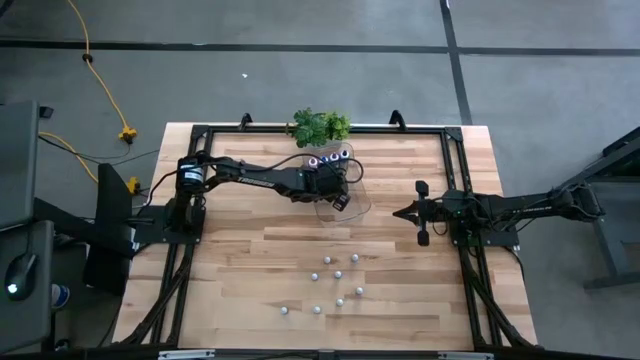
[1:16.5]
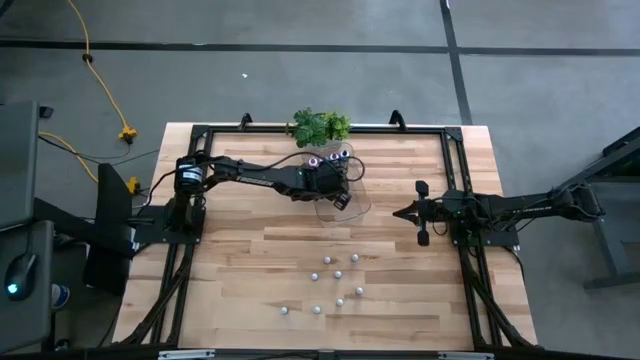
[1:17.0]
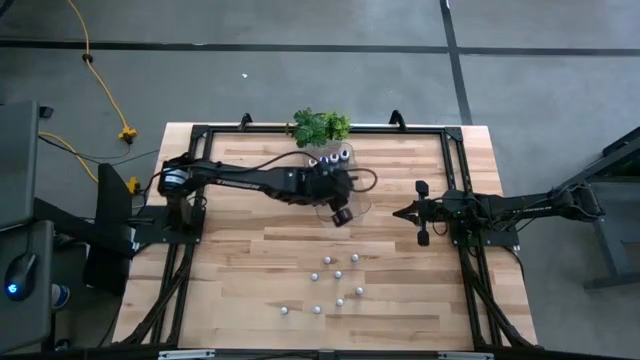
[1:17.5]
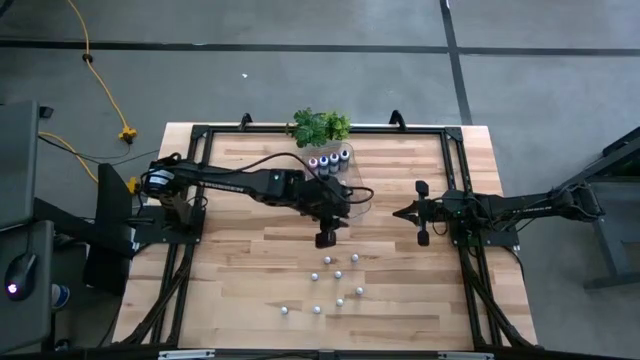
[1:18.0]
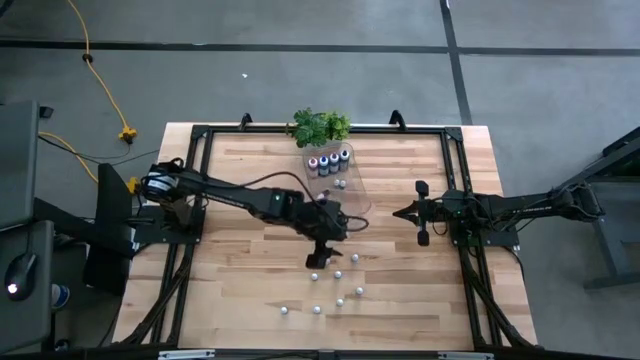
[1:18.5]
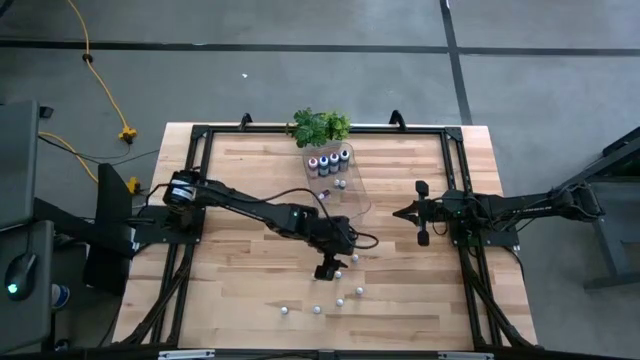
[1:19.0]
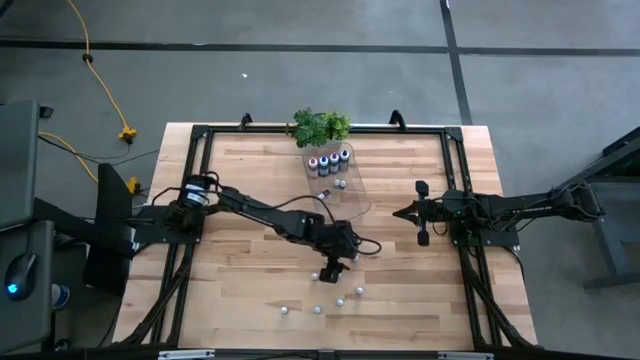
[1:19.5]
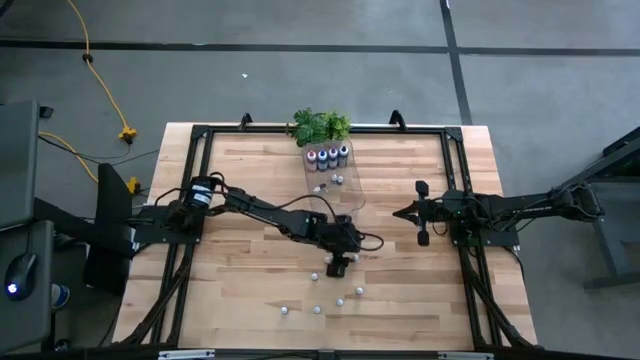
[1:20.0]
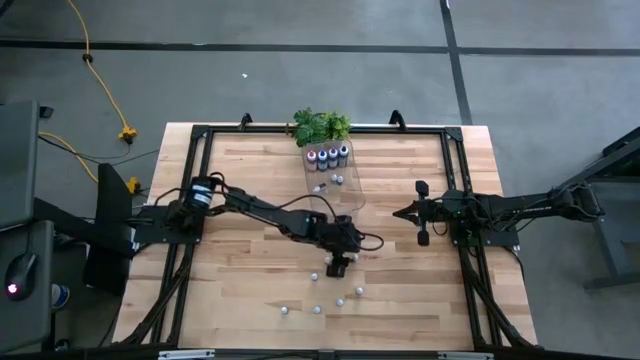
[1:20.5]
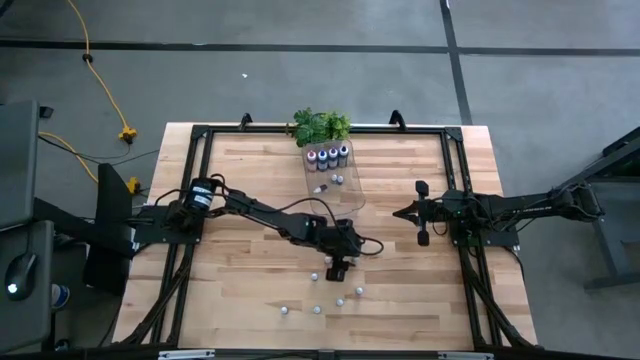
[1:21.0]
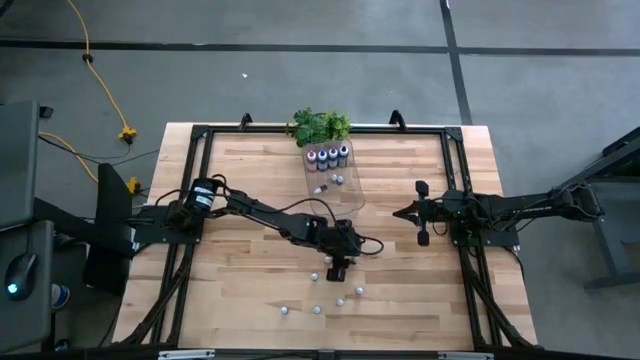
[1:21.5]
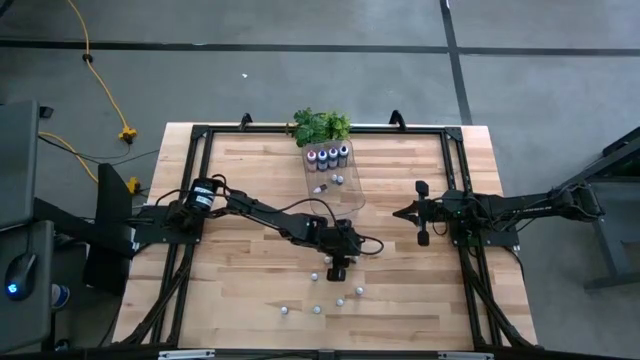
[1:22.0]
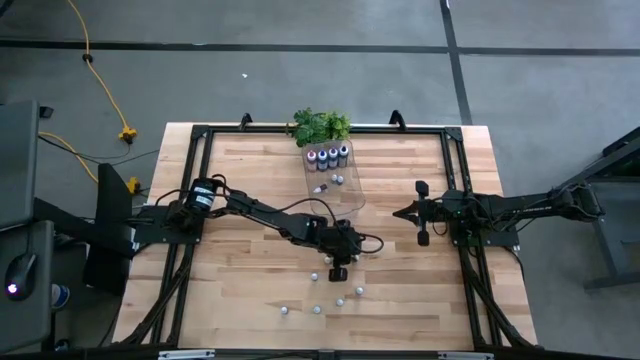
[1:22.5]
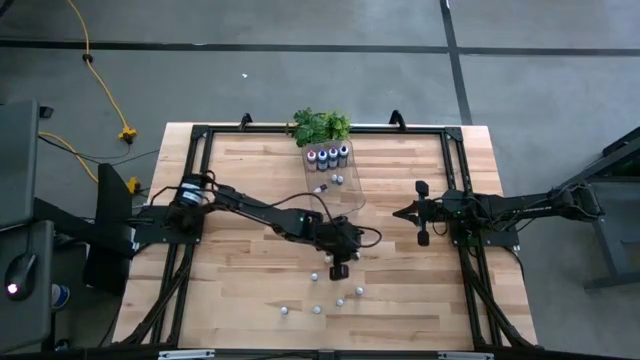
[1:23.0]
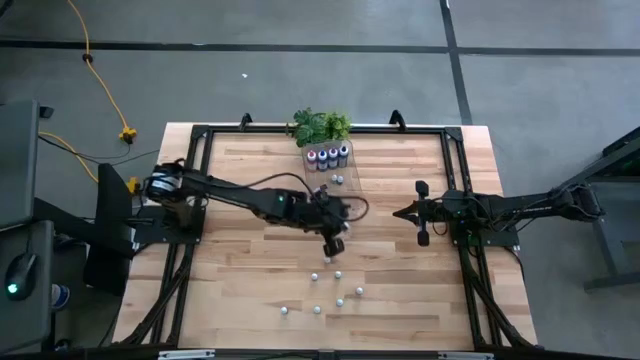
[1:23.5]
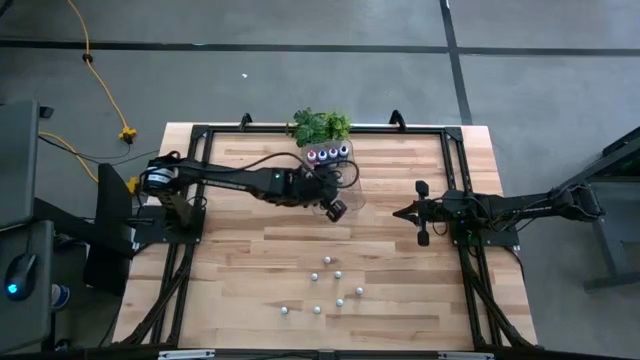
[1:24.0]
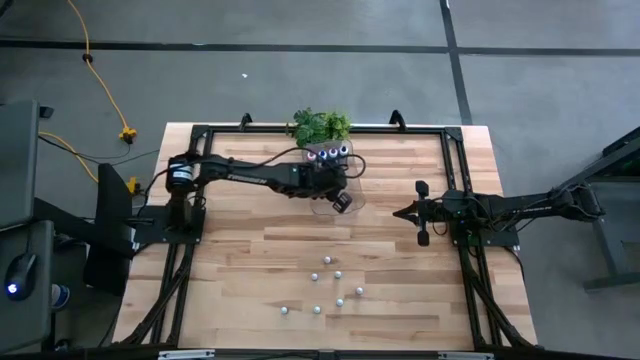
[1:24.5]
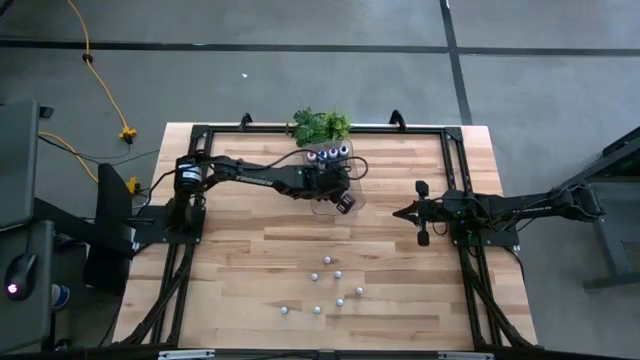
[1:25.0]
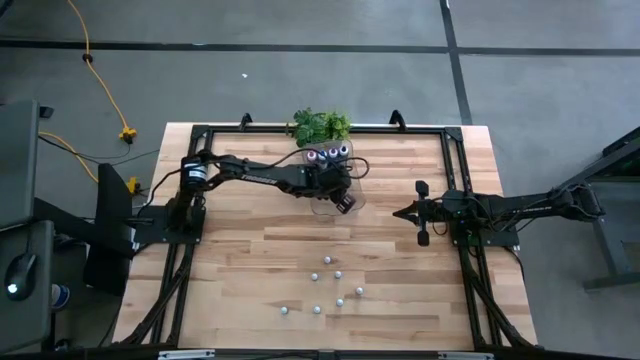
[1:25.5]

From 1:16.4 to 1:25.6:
Task: Pick & Place food coloring
Put the small blue food coloring bottle into the transparent bin

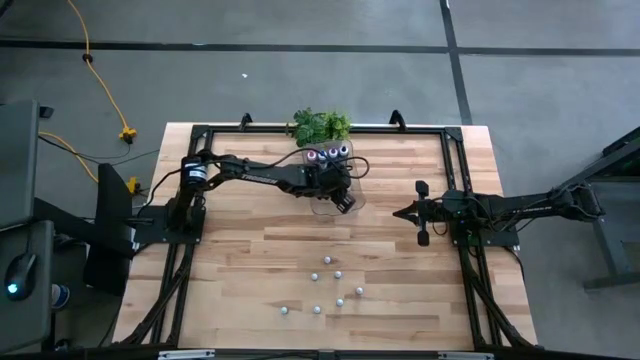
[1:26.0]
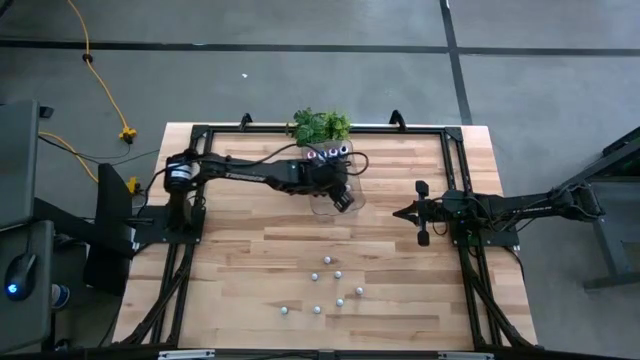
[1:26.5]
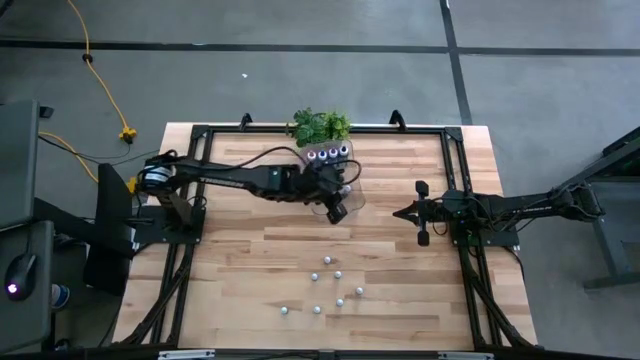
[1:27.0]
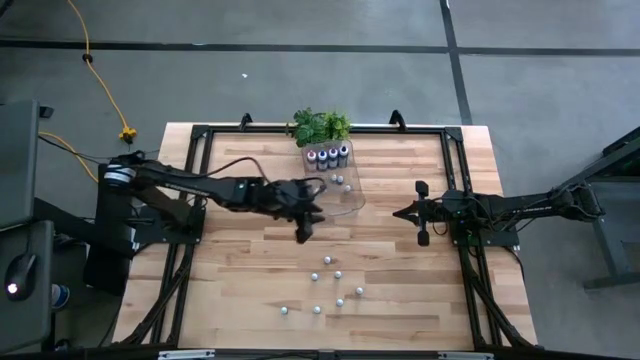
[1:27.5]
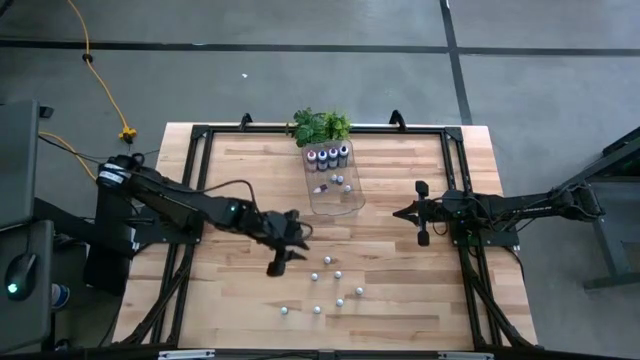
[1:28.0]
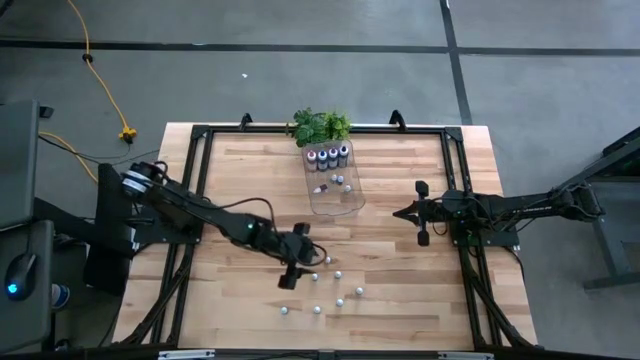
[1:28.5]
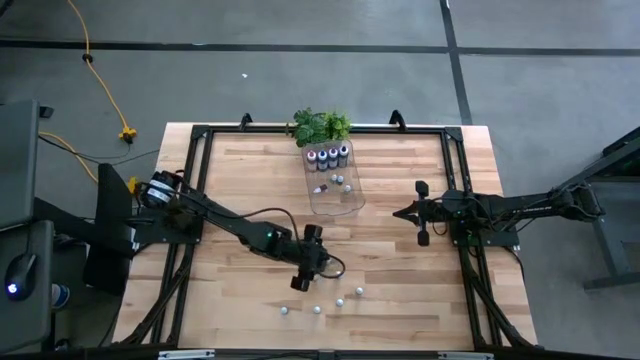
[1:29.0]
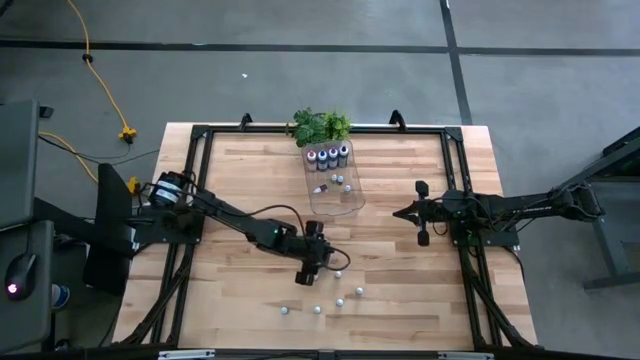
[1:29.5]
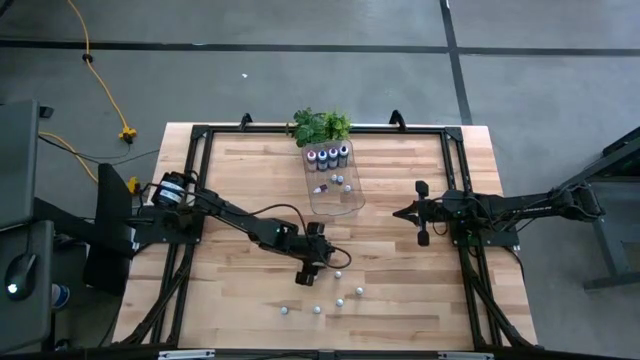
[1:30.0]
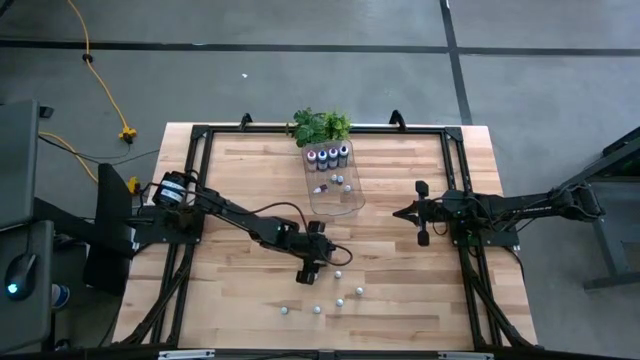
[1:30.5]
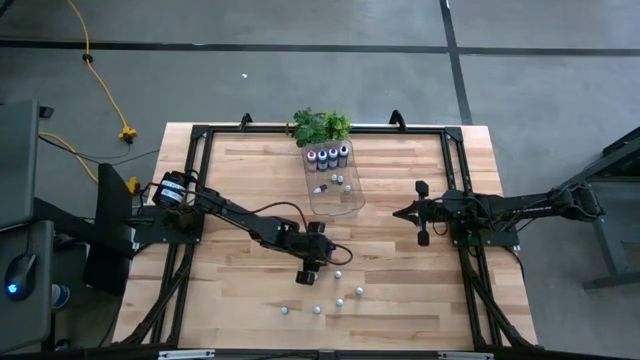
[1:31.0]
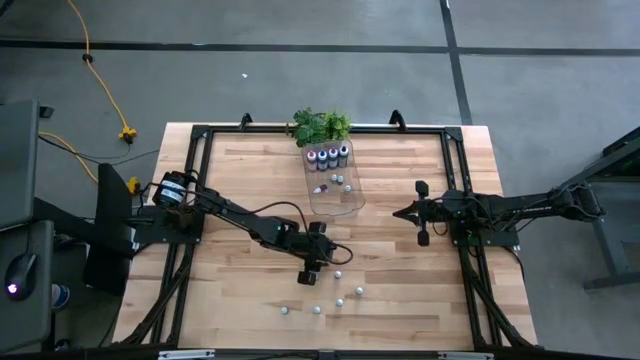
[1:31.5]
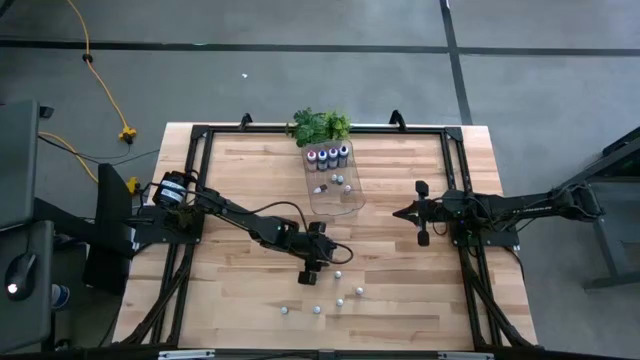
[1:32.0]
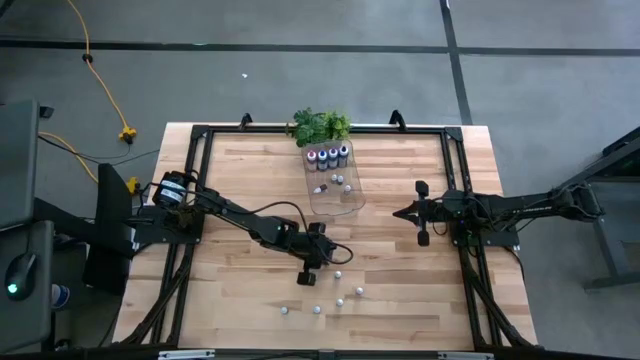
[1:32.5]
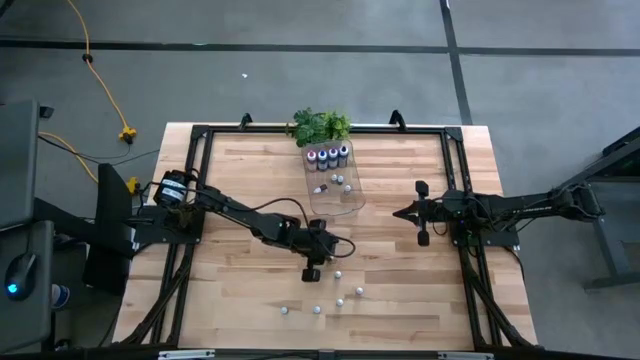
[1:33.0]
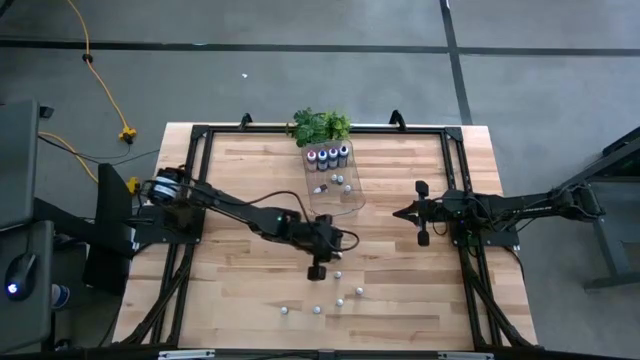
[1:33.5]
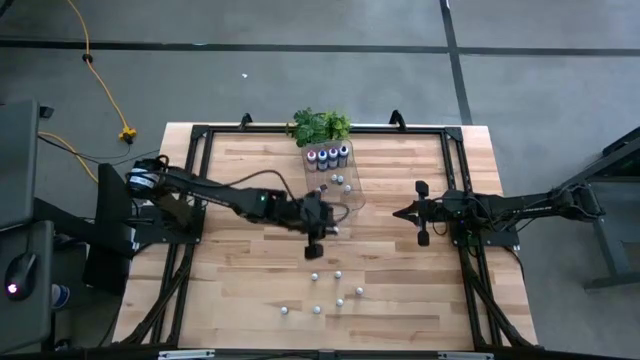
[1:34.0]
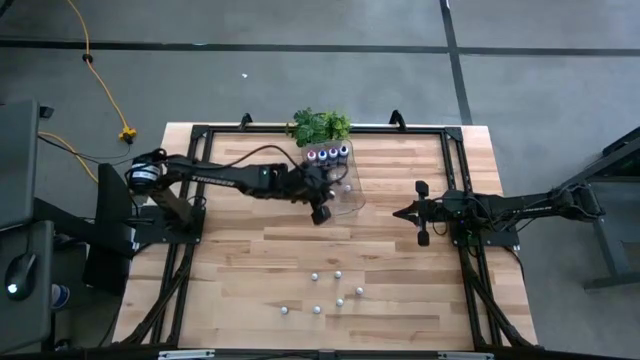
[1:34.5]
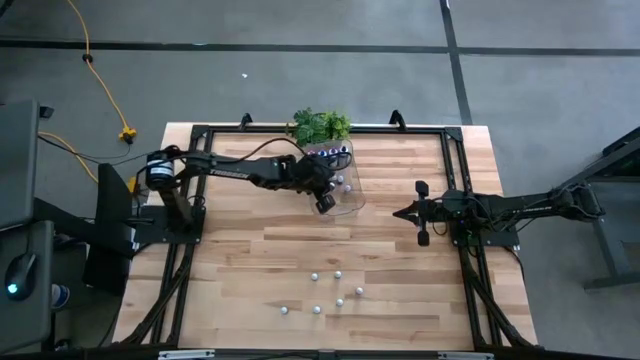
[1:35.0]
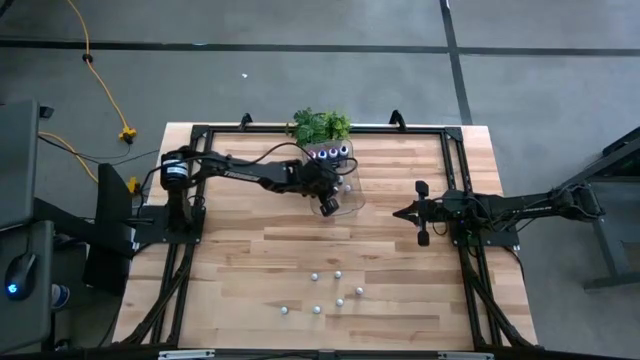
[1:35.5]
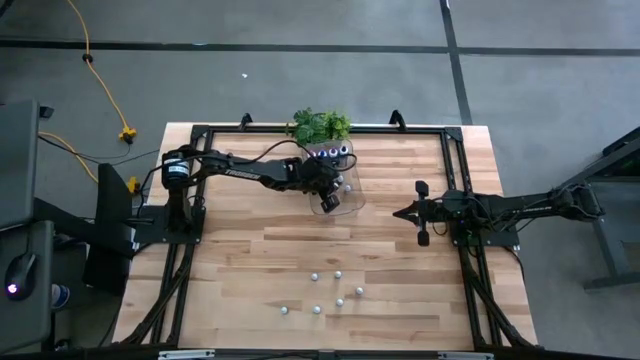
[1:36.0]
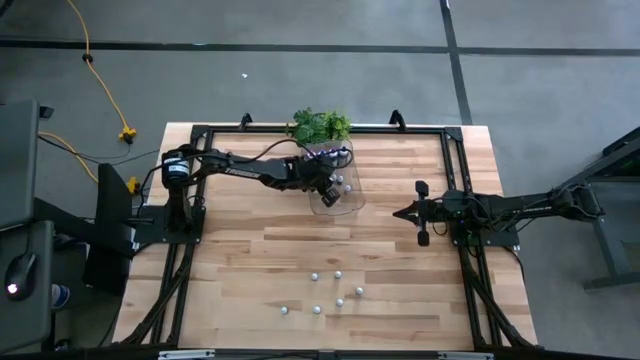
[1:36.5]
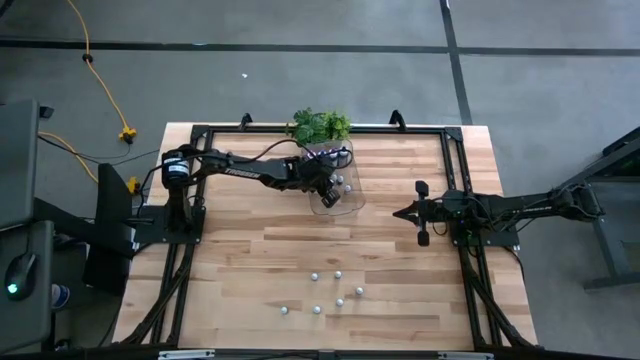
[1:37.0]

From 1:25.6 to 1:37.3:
Put the top small red food coloring bottle into the transparent bin
